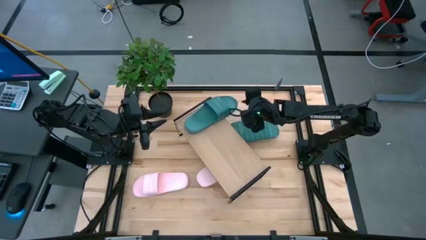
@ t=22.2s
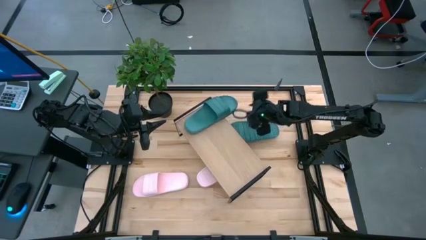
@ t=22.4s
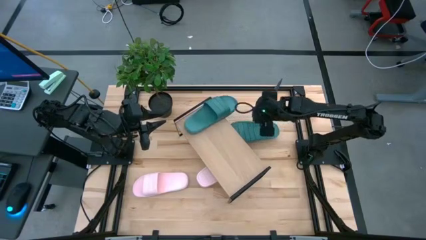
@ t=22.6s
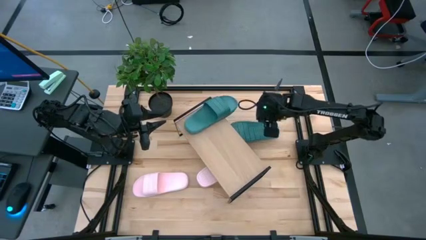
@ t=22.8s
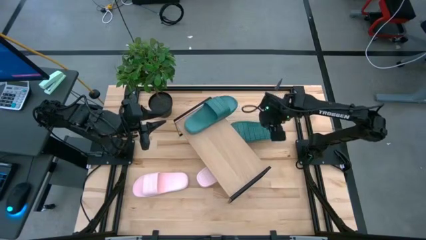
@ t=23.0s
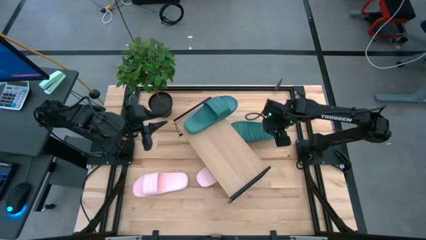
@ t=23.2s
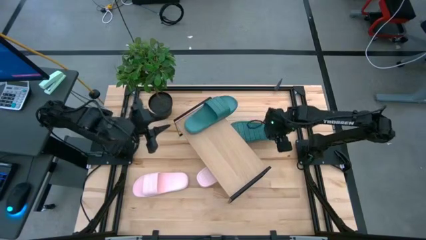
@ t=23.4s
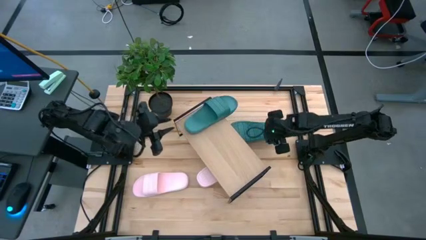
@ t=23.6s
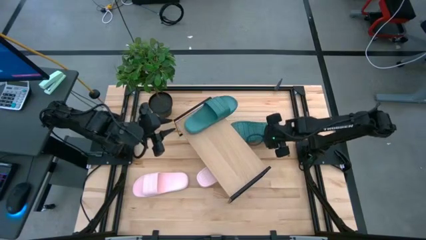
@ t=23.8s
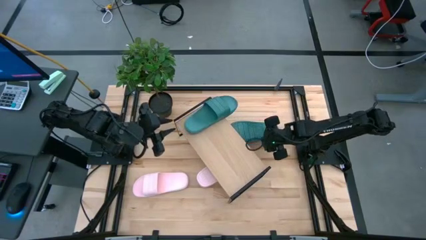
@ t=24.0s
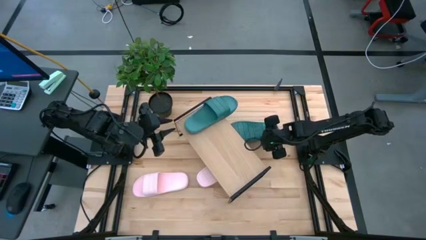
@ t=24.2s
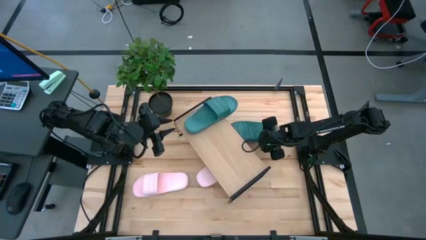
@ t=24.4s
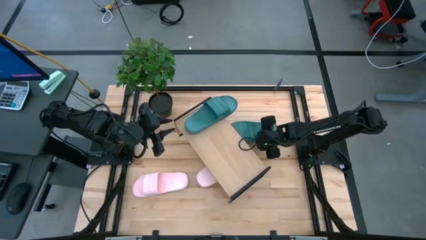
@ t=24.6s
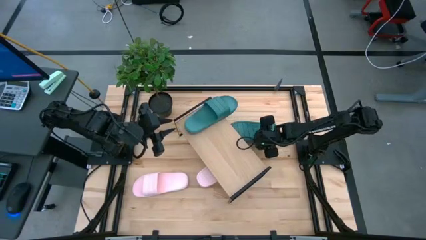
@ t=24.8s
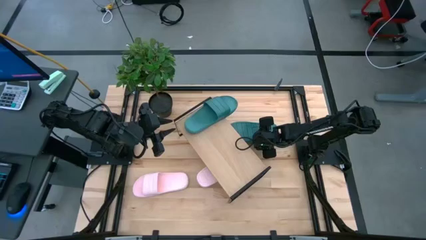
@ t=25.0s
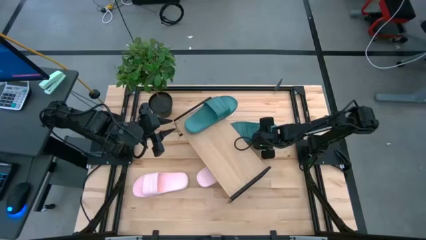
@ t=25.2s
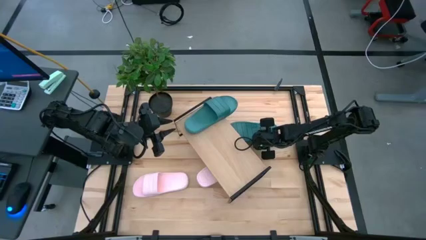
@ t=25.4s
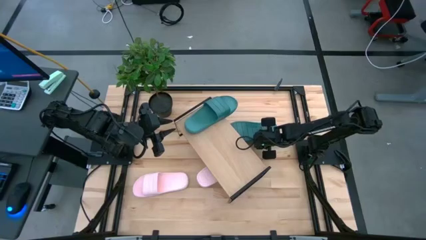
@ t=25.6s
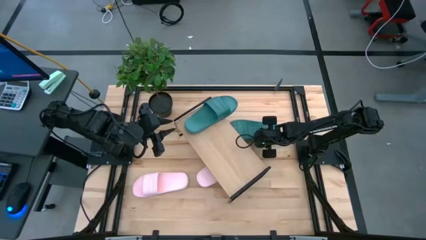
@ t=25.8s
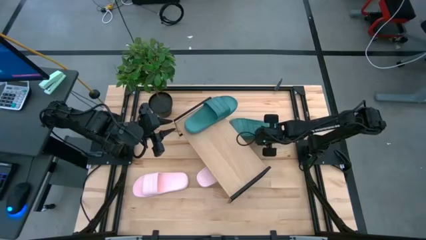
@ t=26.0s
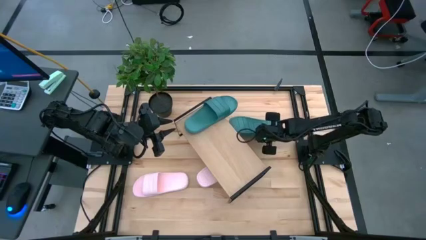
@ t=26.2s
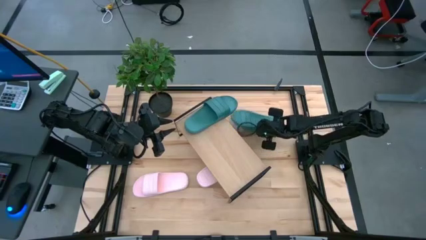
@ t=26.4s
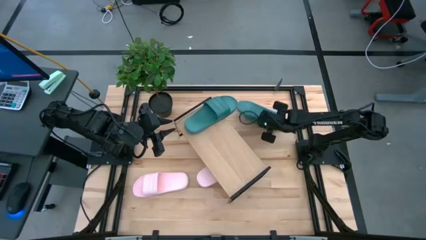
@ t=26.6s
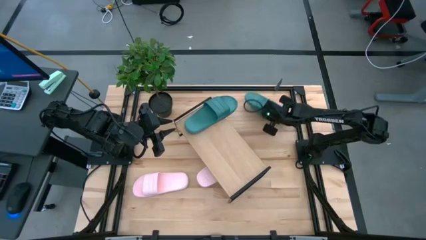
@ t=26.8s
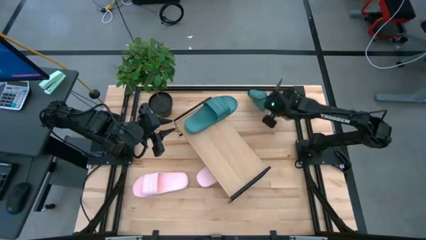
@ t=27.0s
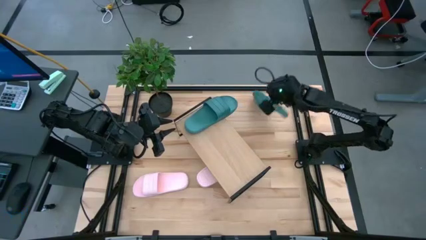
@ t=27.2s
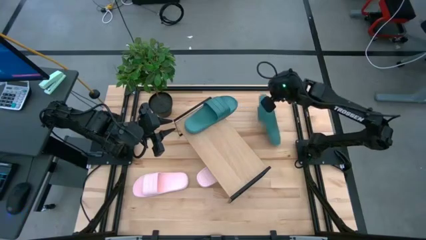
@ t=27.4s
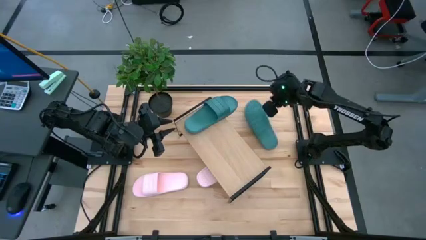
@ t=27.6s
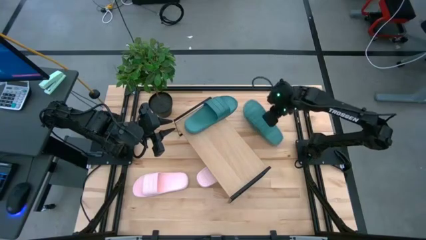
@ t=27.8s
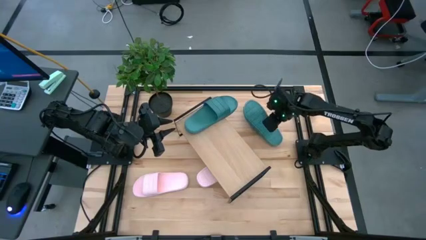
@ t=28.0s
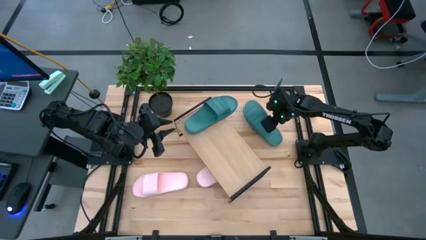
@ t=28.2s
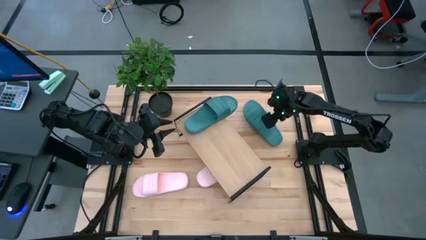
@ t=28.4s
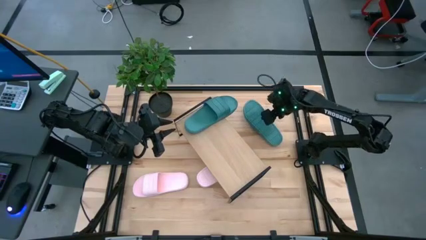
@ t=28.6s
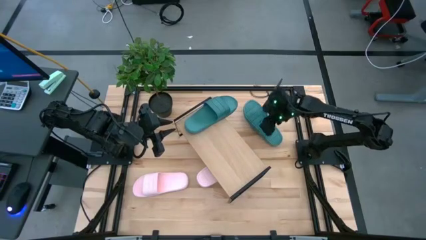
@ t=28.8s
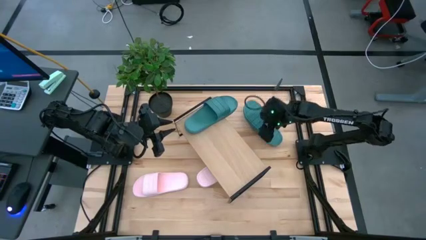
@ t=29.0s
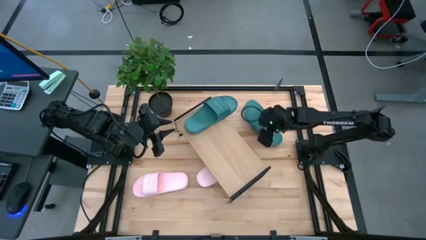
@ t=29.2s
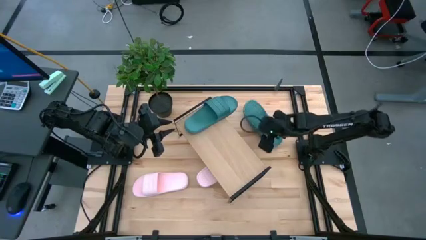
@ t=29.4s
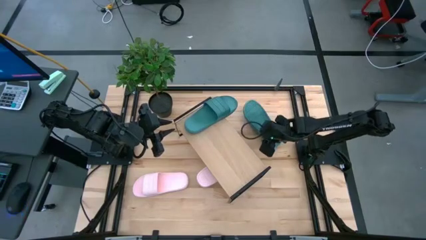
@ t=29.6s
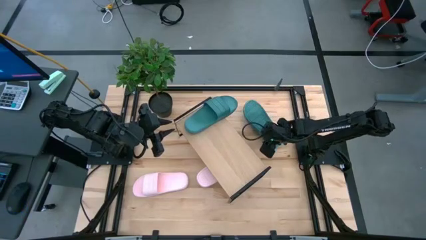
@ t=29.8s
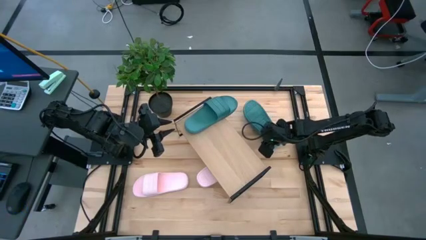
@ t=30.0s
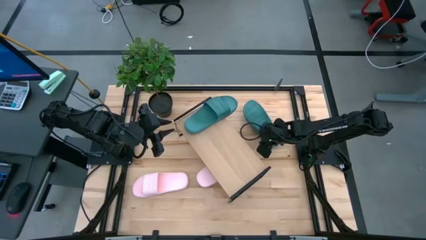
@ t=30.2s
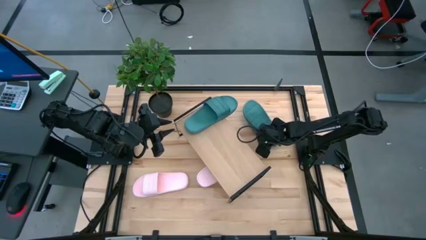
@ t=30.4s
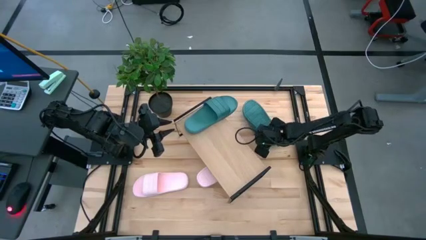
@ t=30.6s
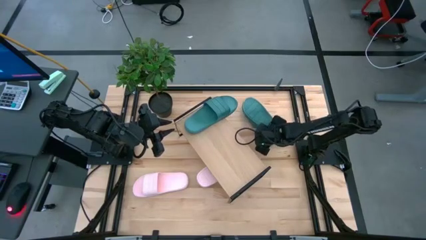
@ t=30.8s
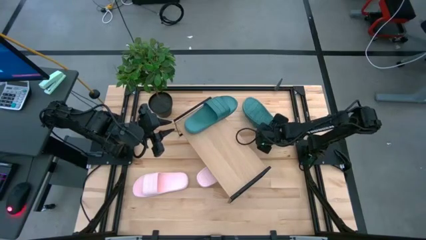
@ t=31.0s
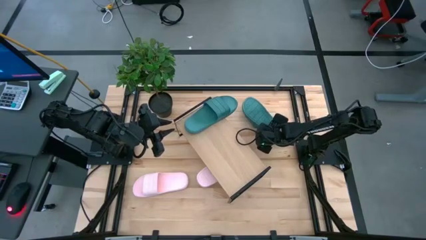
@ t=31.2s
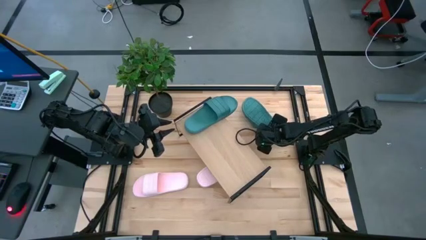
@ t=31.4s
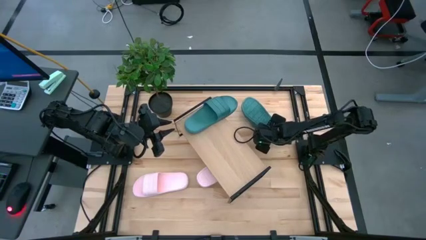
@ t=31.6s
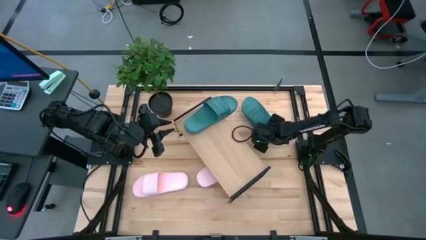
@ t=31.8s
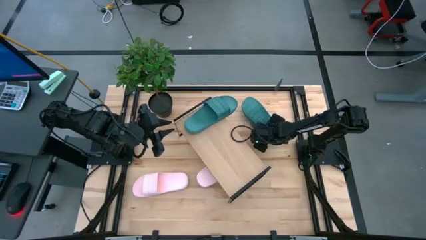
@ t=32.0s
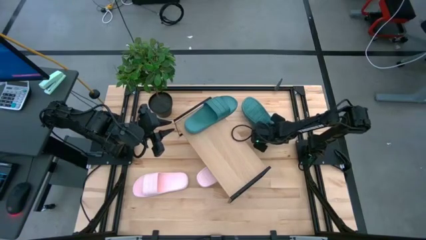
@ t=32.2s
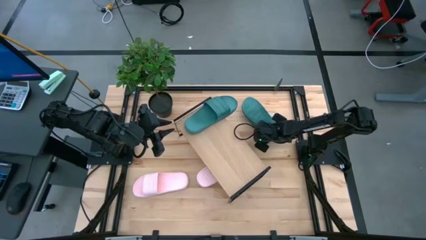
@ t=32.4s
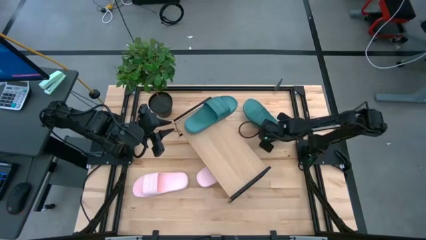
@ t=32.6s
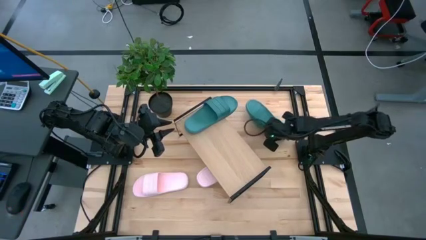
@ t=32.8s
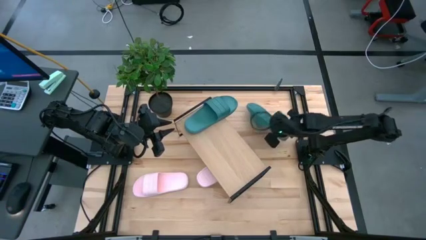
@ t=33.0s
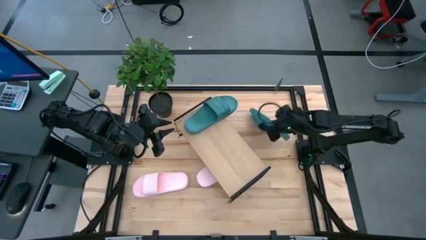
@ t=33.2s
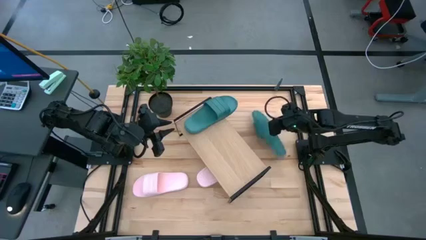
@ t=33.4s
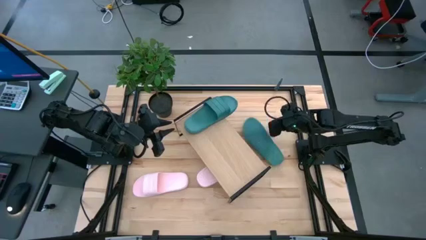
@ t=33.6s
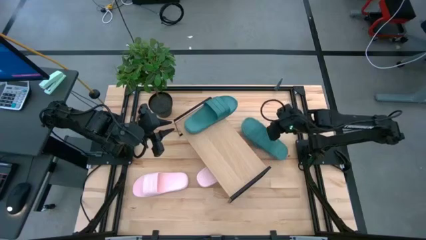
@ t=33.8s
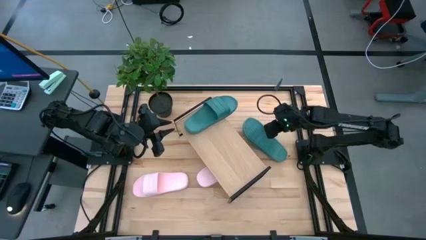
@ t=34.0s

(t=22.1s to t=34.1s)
Task: Pick and place slides into the shelf
Put the green slide on the shelf
